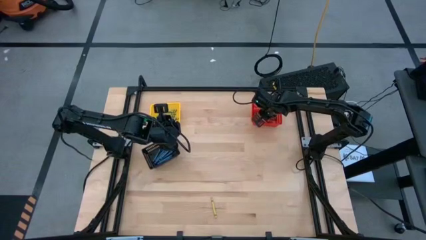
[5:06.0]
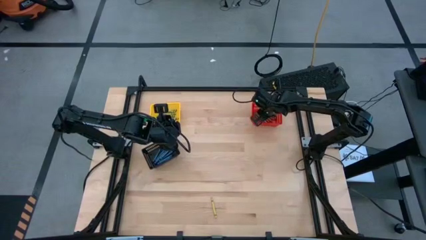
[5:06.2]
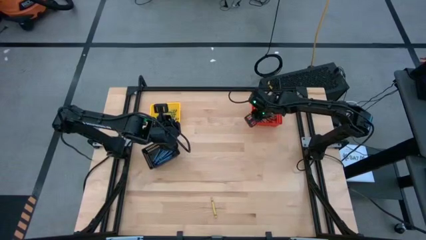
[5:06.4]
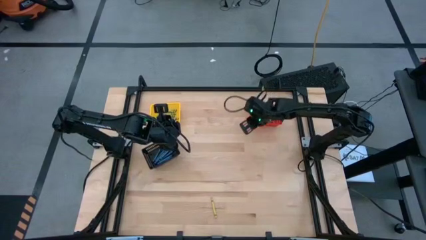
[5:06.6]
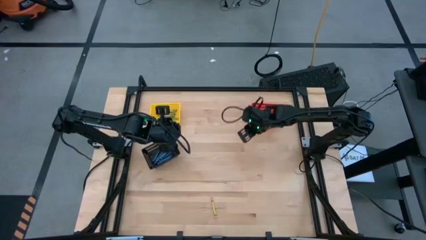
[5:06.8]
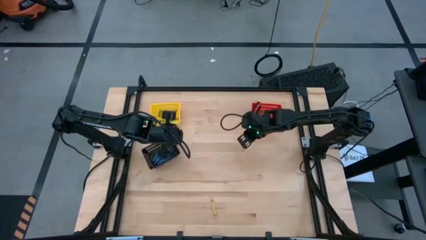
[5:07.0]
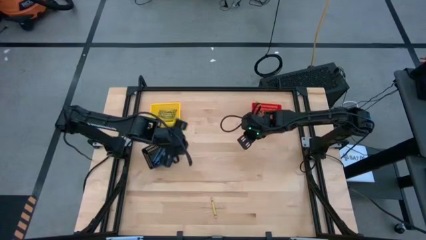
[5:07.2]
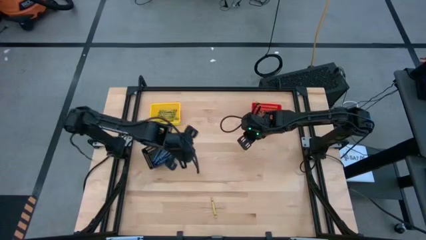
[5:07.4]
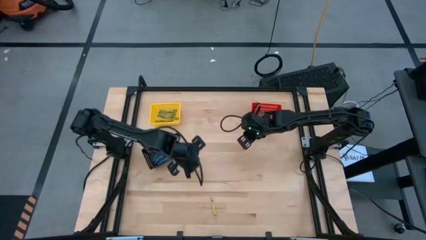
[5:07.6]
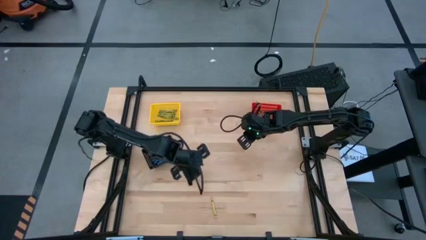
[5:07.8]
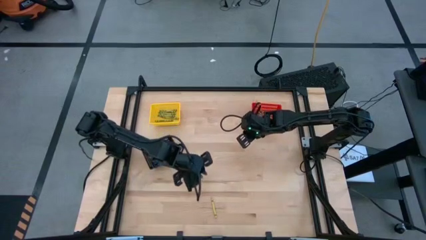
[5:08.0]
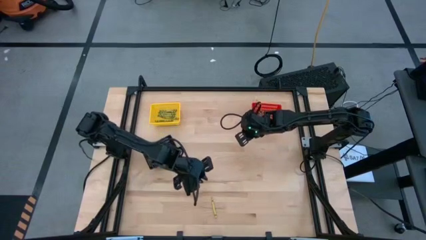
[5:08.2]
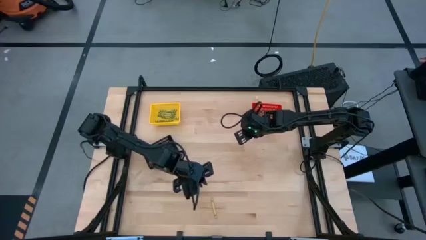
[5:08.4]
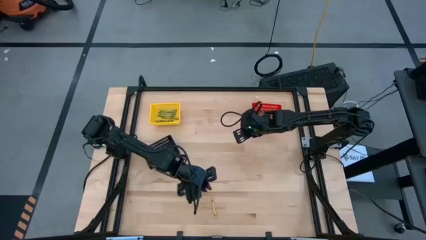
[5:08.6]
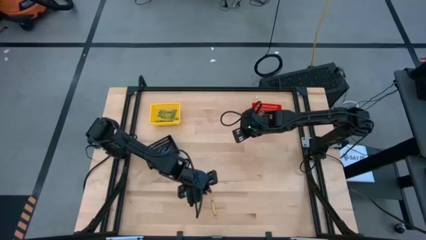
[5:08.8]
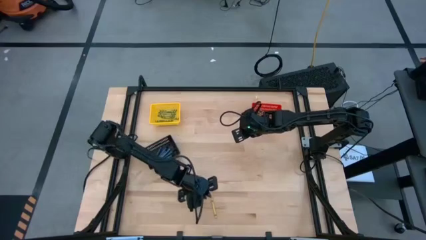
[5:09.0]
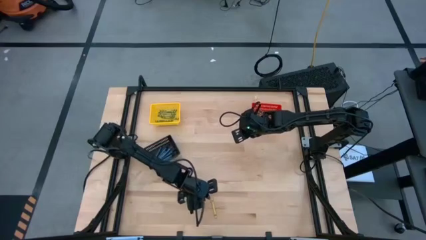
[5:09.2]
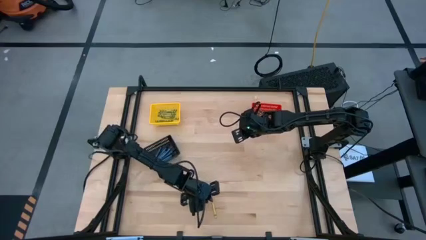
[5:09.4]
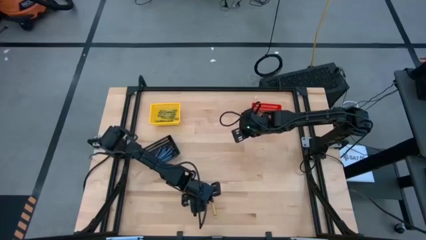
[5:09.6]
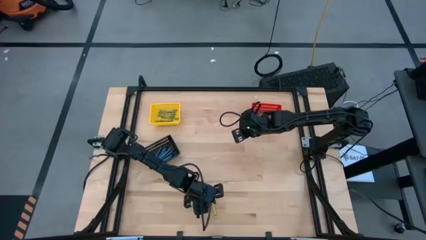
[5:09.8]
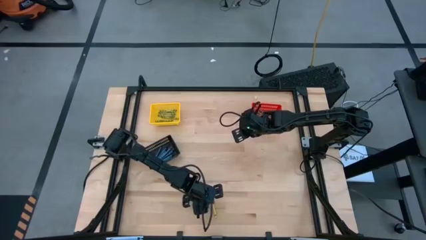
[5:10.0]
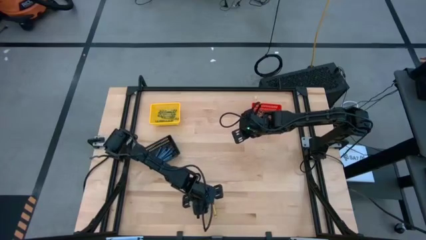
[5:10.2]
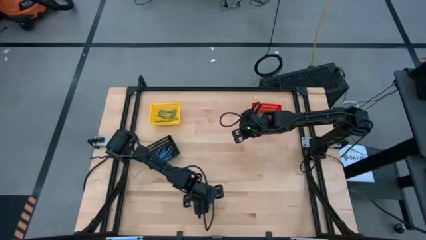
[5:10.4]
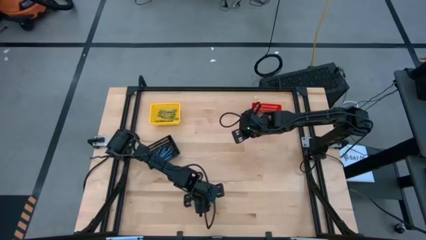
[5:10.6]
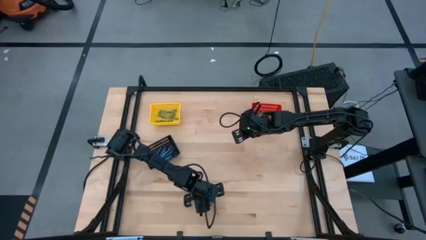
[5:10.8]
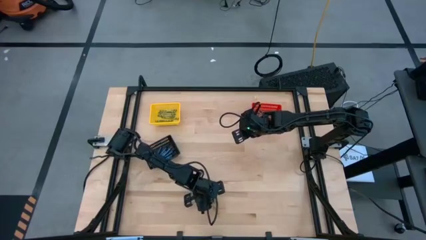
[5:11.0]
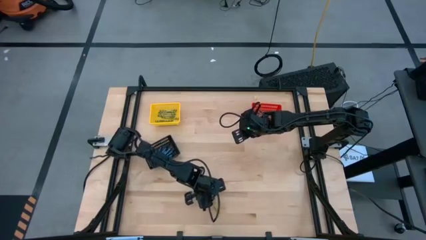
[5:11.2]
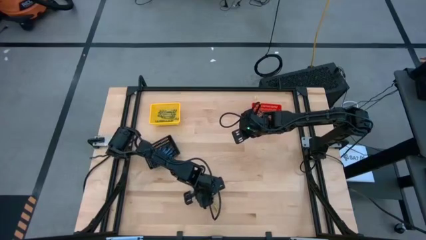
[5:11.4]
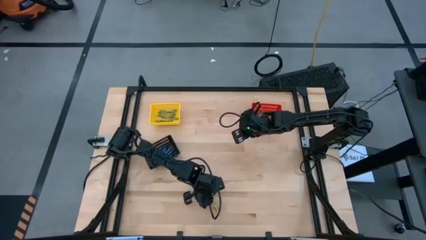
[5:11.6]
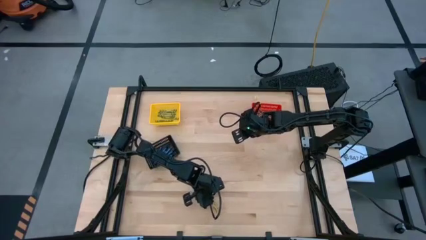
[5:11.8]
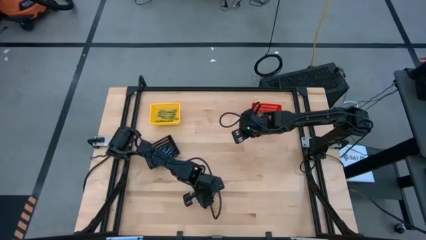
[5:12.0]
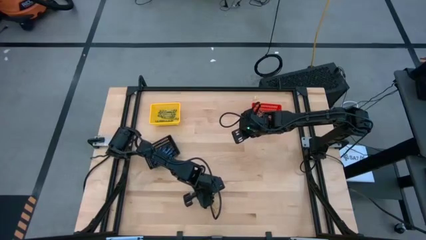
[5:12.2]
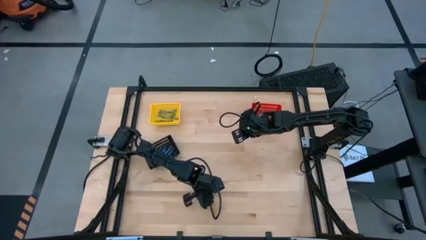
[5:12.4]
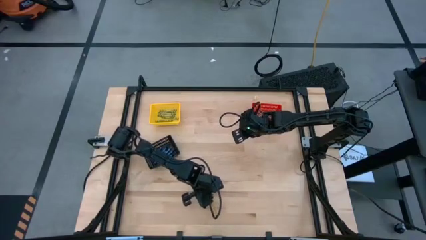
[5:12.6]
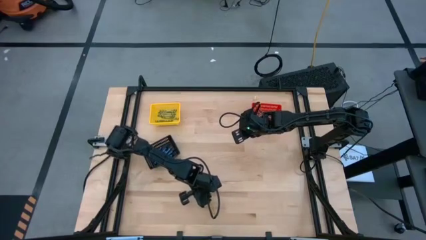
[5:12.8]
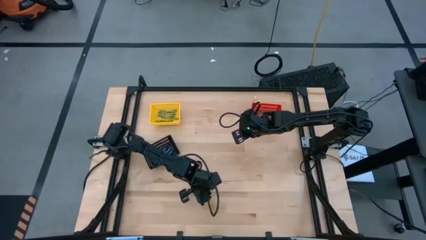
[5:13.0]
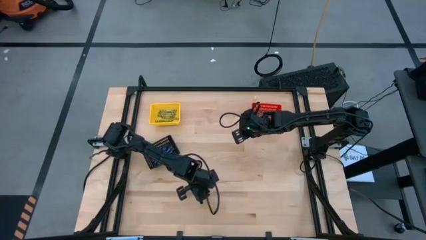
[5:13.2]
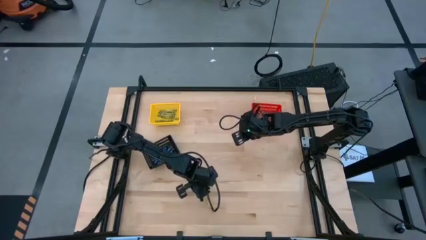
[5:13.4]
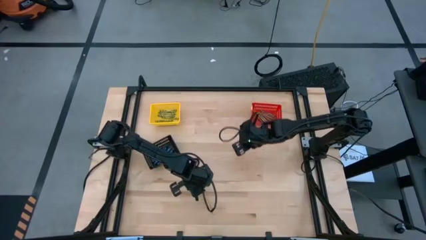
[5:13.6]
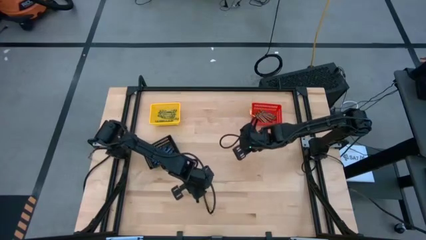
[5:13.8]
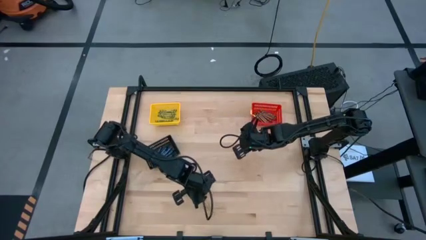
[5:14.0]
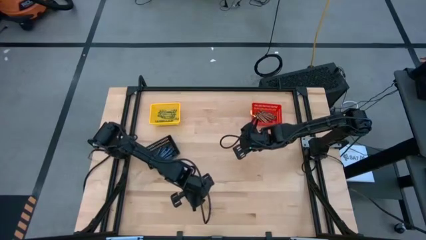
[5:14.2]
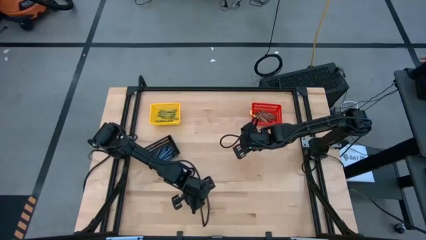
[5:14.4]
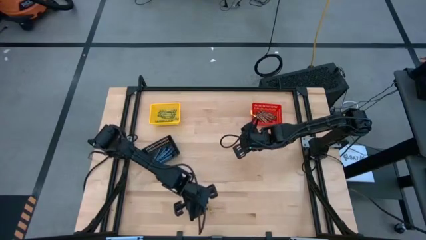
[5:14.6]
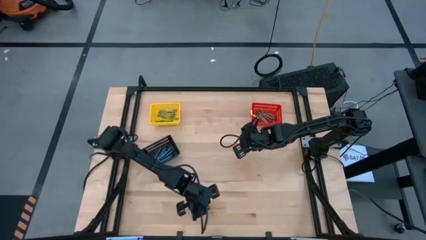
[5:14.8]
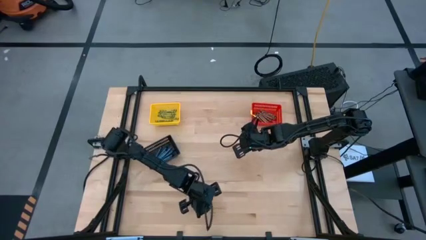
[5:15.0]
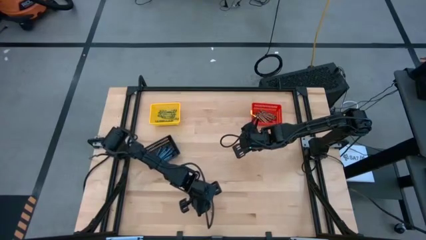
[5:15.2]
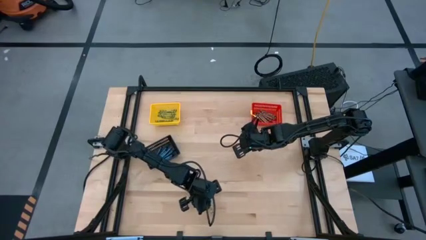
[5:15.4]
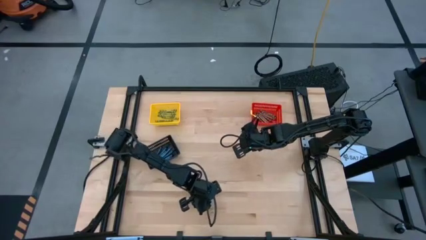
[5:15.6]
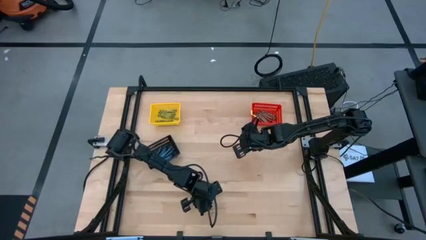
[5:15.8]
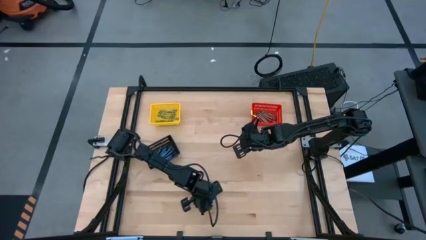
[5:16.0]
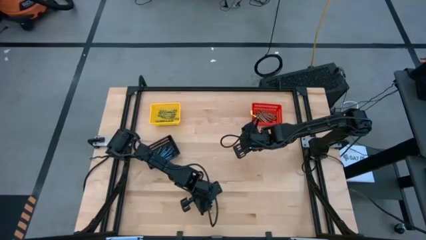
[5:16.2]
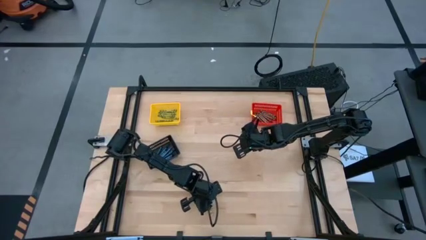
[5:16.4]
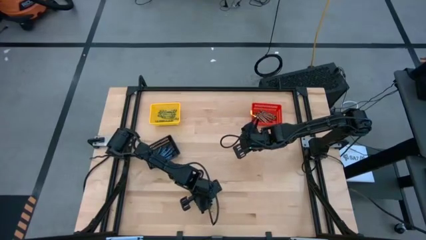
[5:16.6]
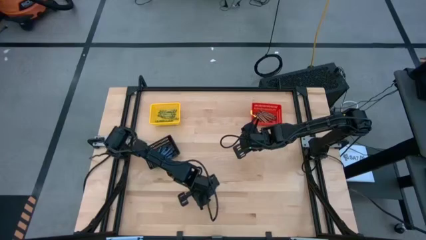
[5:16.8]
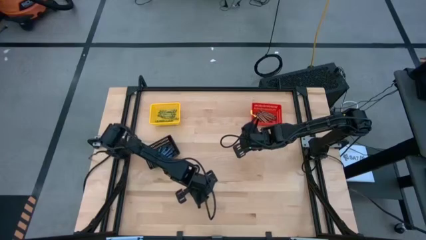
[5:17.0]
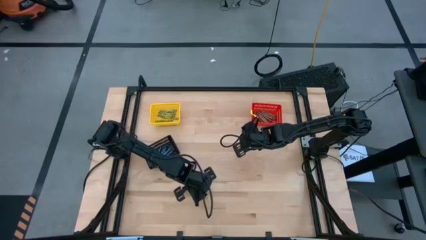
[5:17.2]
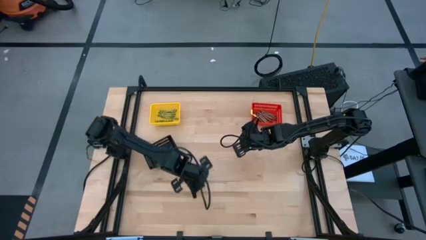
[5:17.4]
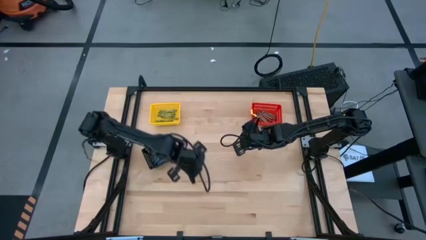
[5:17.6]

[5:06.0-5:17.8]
Task: Sort crayons
Put the light green crayon into the yellow bin
